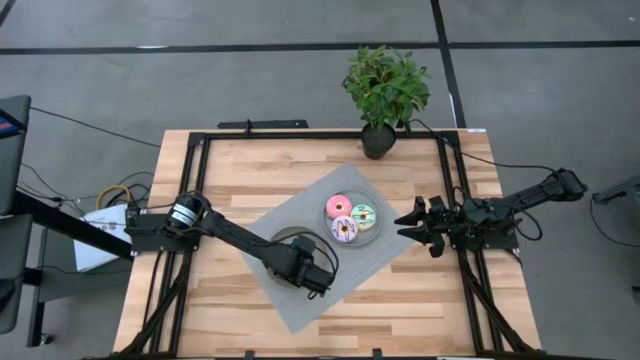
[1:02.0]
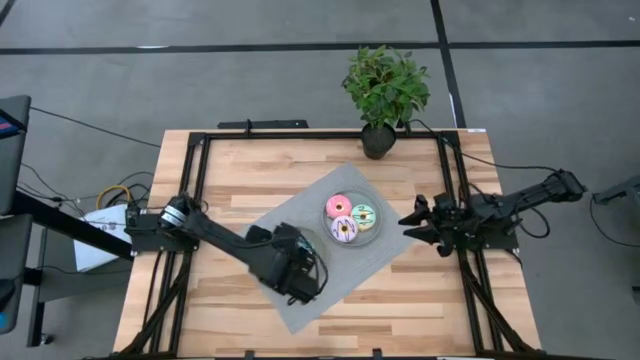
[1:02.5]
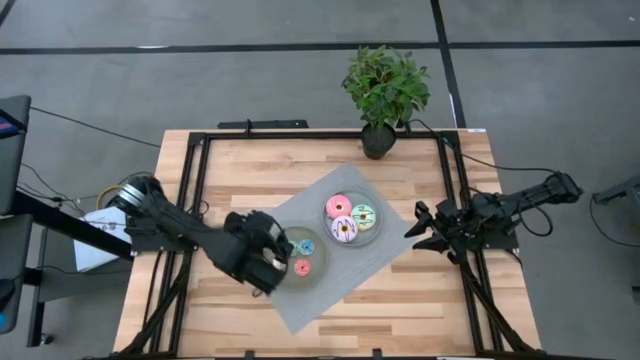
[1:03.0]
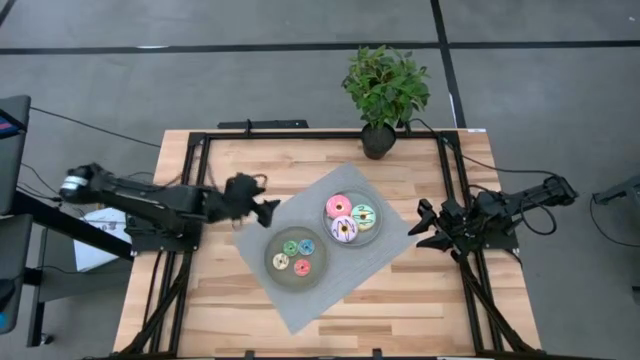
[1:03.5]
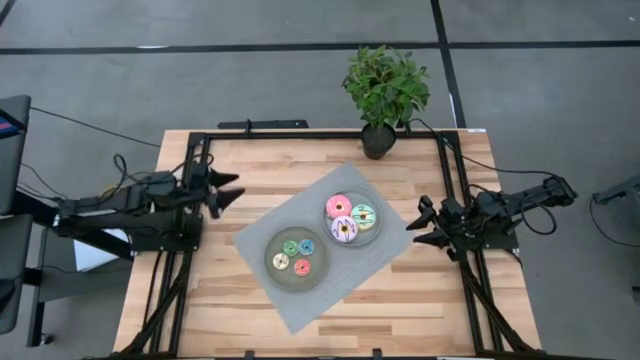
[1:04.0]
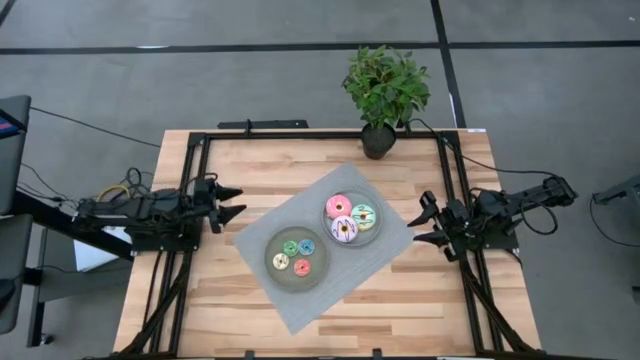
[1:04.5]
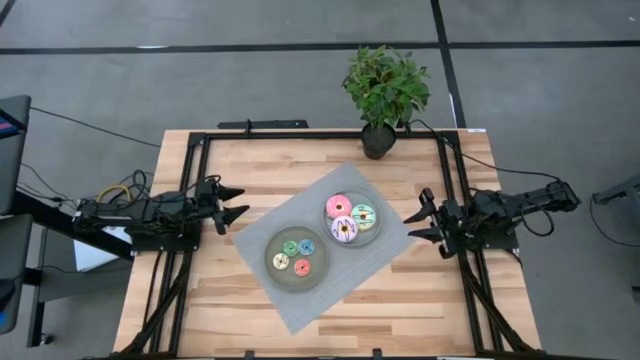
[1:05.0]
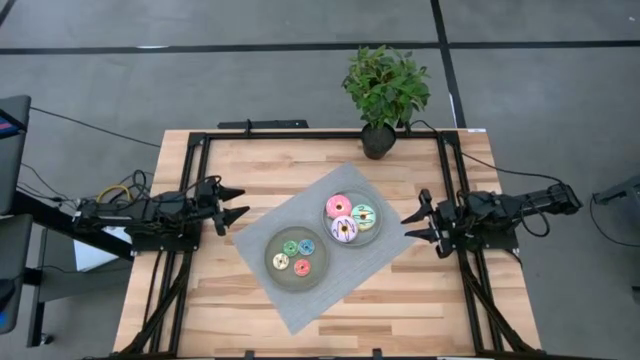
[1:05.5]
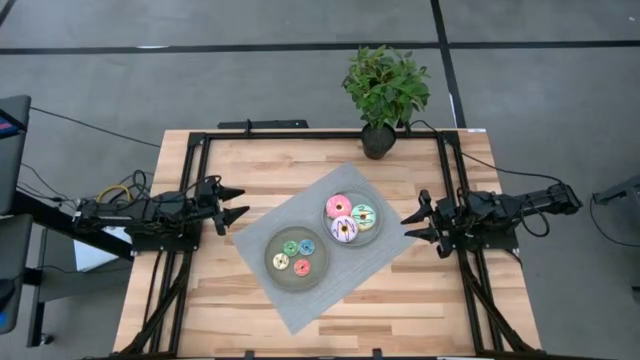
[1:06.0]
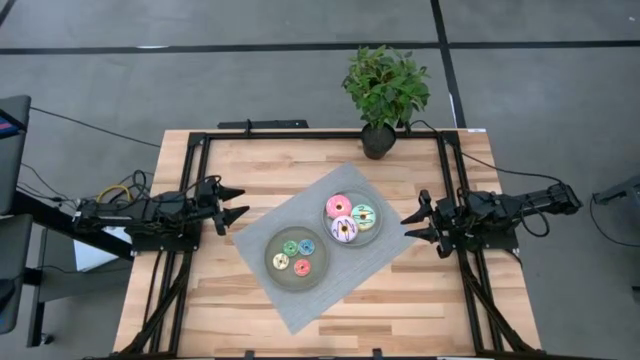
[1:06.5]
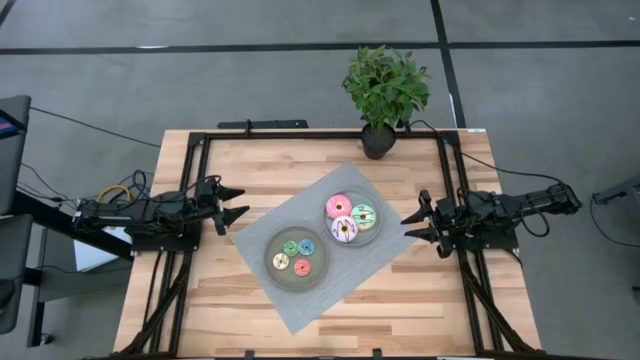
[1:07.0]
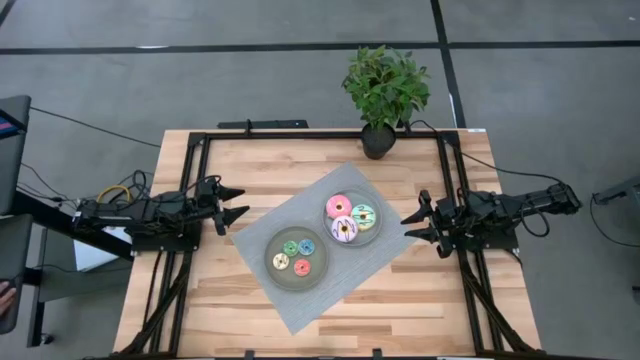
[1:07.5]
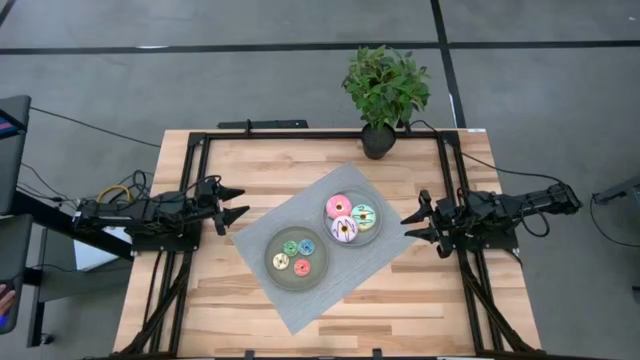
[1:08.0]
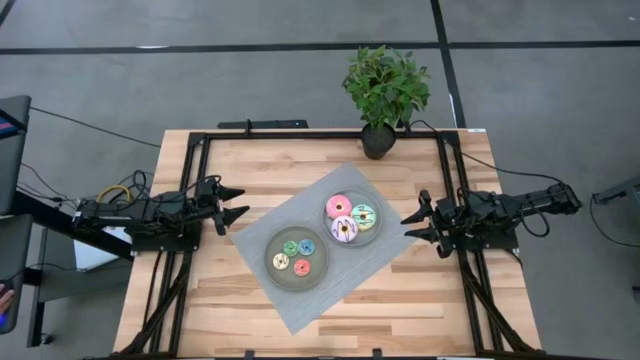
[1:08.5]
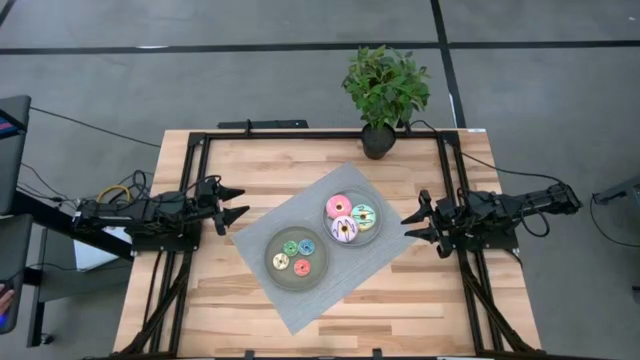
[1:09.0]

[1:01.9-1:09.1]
Task: Pick & Place donuts
Return to Home Position

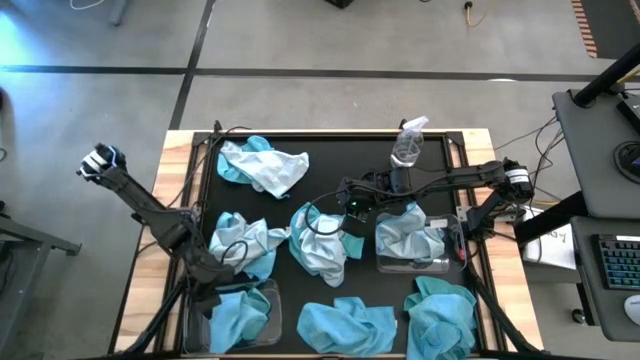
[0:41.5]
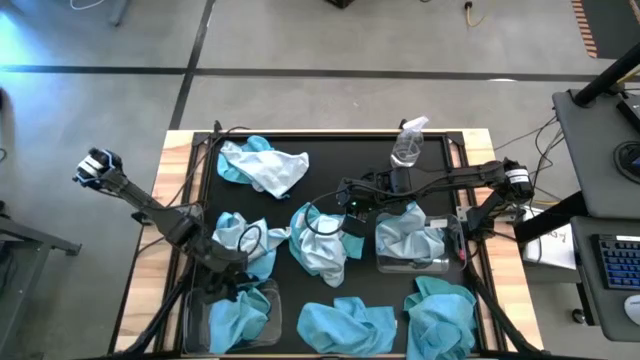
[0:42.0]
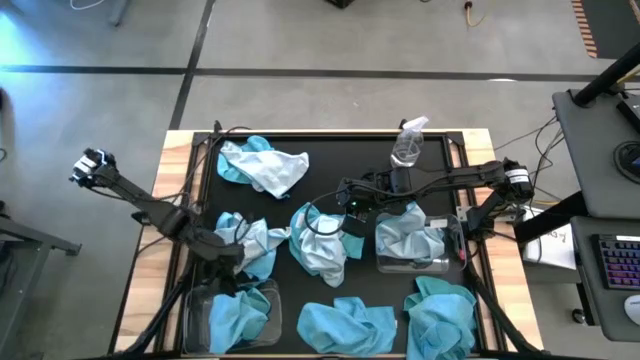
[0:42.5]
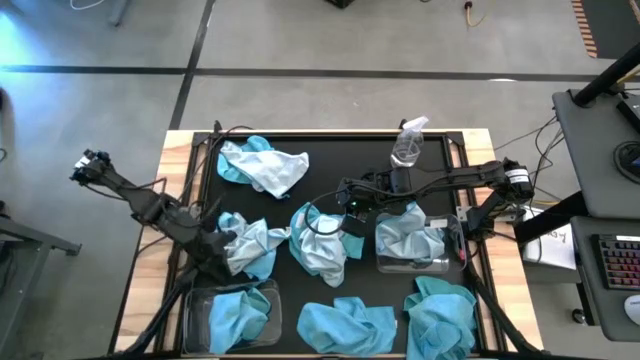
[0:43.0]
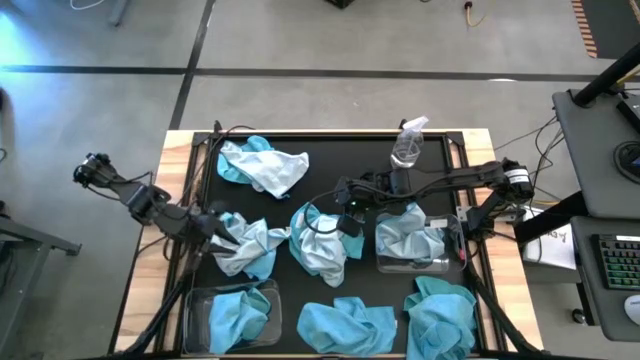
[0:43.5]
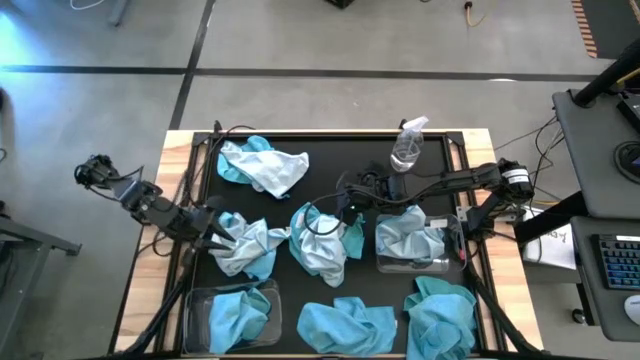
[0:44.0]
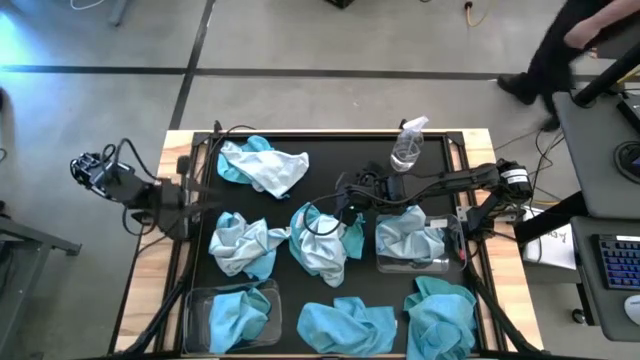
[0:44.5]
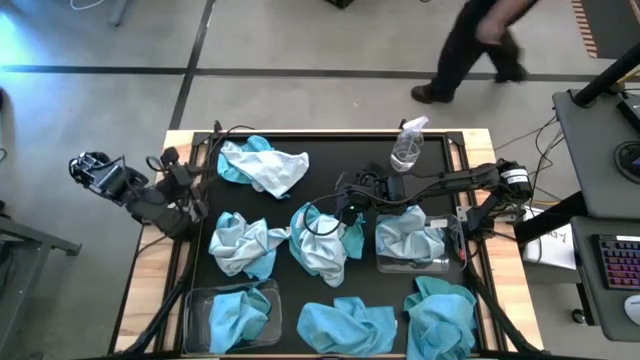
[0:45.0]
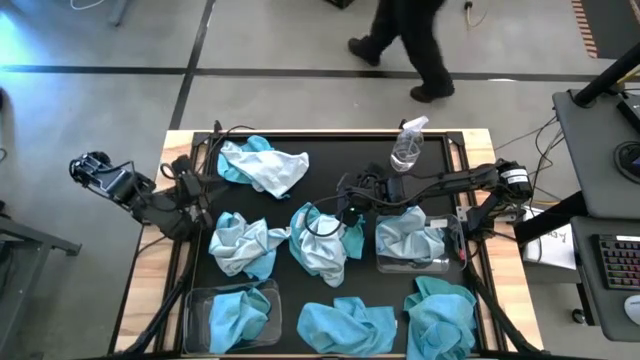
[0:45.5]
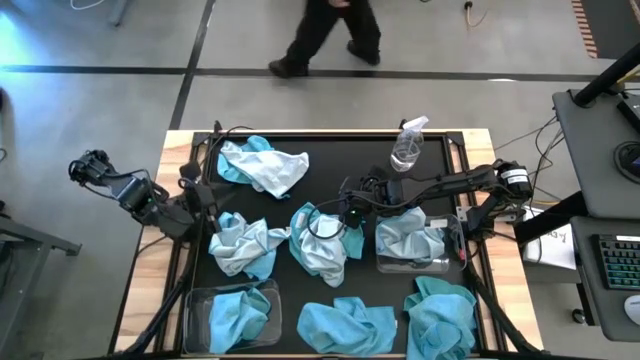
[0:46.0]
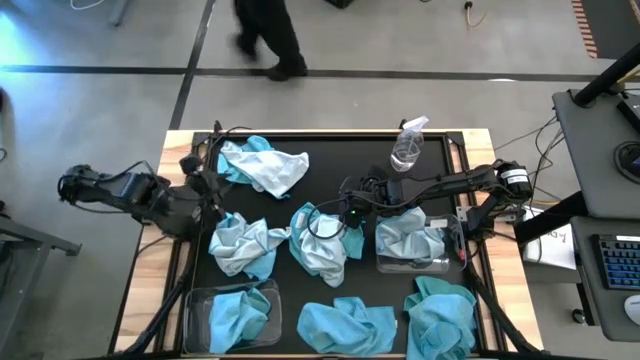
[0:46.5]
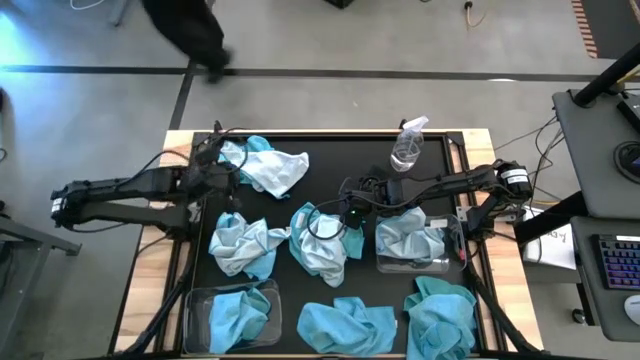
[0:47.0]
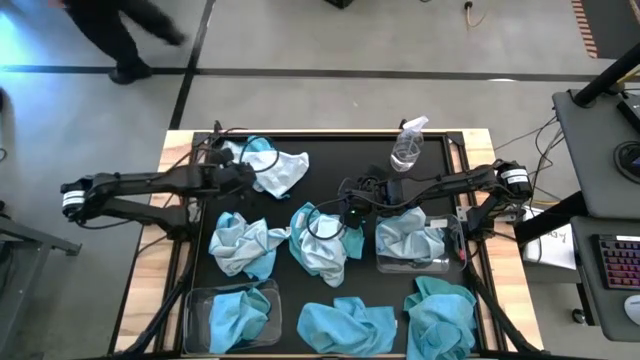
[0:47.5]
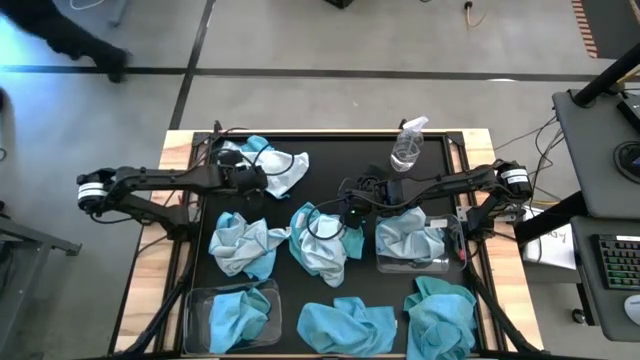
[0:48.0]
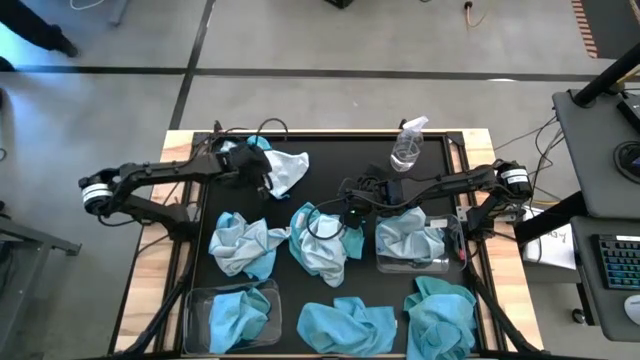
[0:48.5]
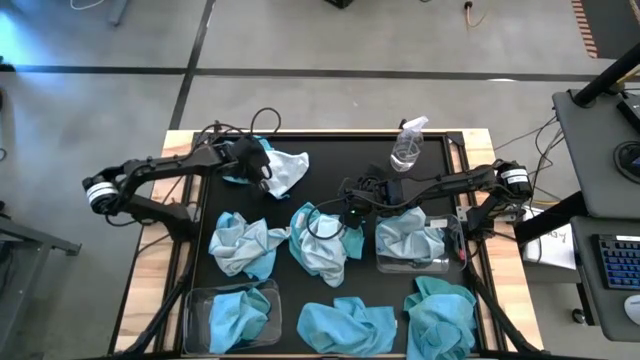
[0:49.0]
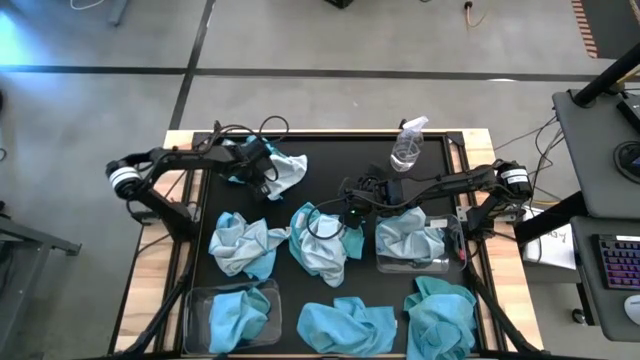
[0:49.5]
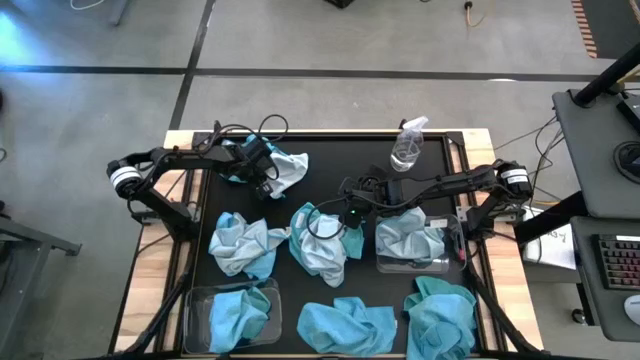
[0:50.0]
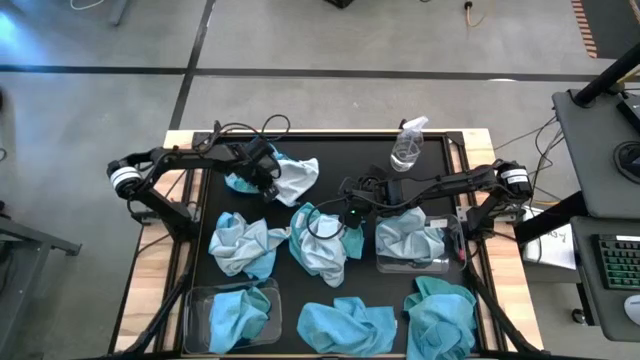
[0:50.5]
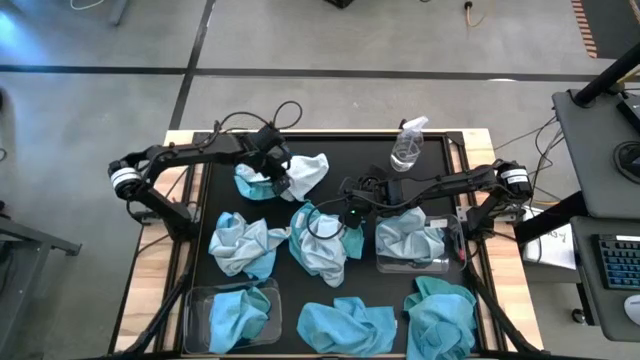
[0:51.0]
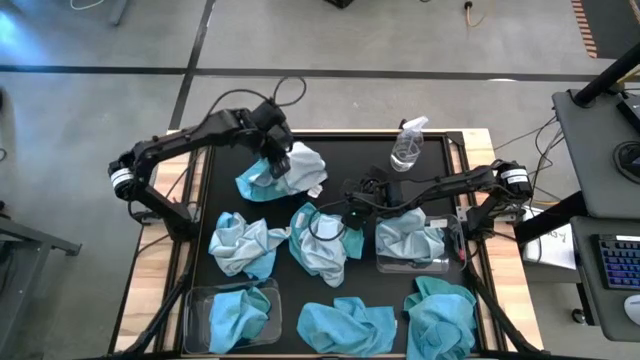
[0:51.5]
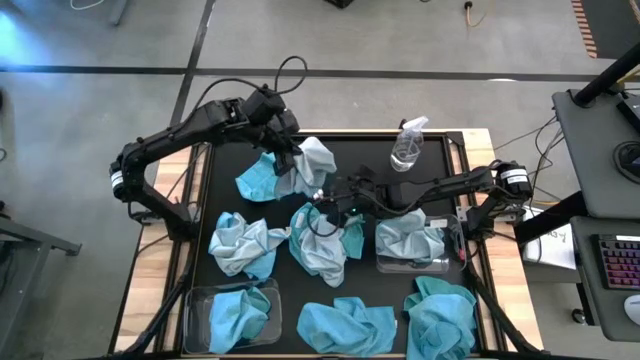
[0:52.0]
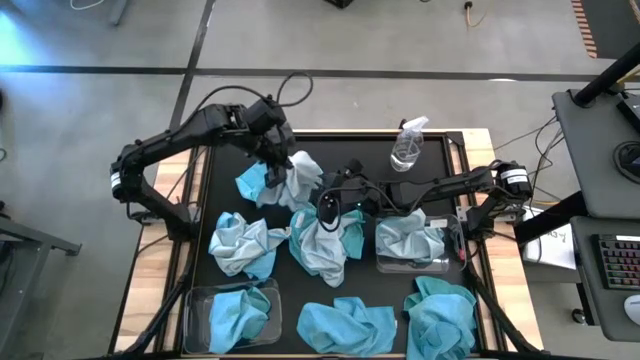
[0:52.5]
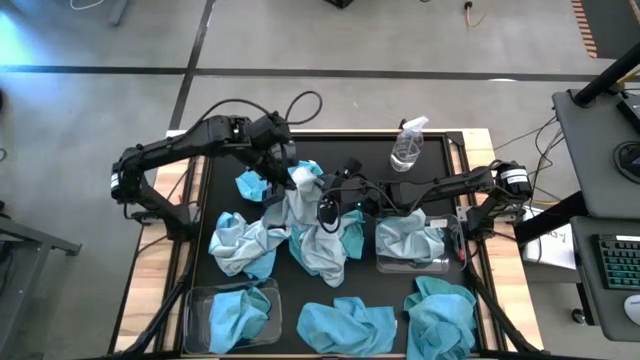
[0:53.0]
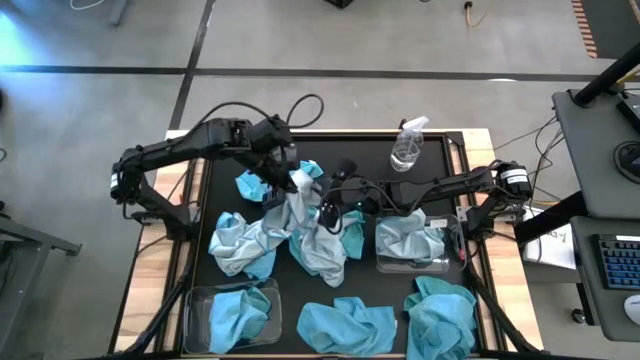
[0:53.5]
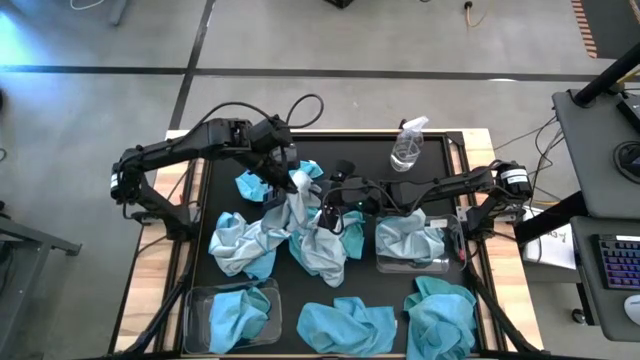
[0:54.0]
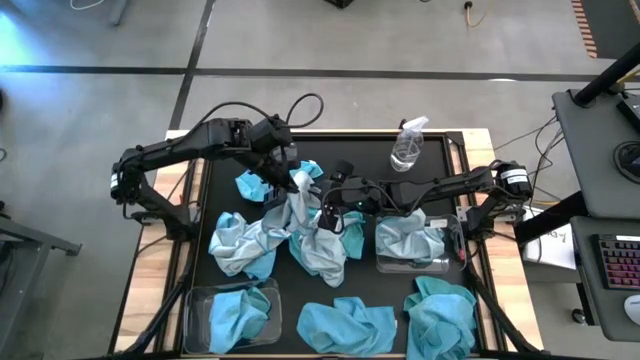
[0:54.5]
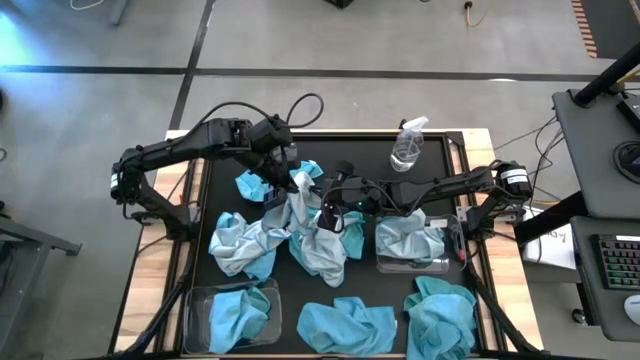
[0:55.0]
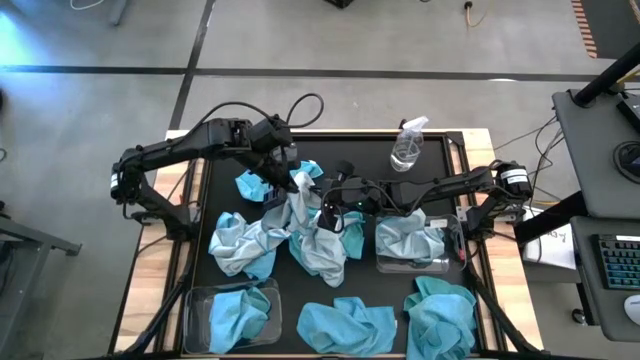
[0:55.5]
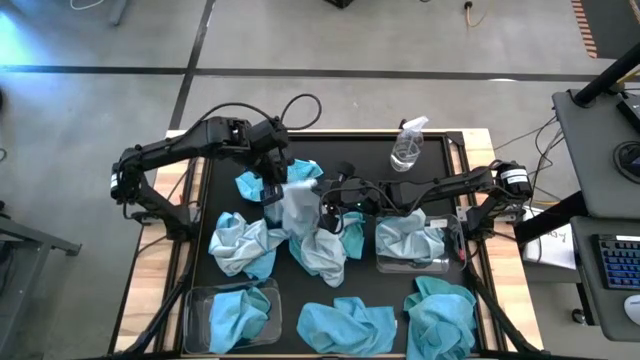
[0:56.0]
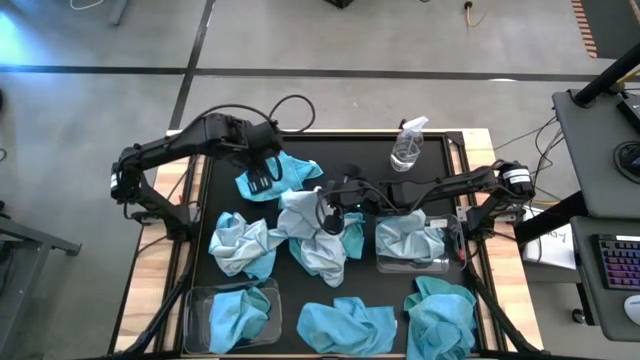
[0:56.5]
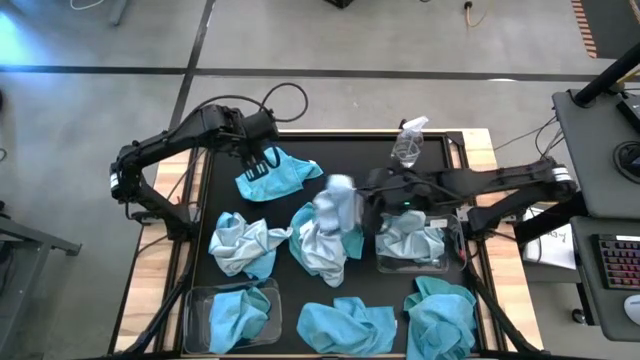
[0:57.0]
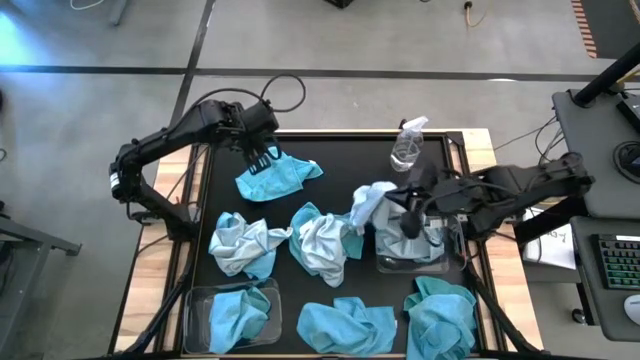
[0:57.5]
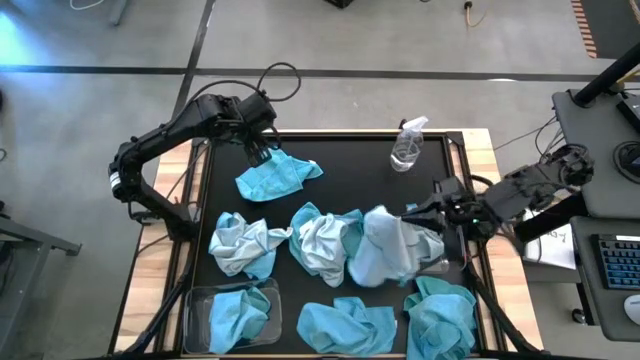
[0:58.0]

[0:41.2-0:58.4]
Task: Sort microfiber towel by color & place in baskets
Put the light blue microfiber towel into the right transparent bin
